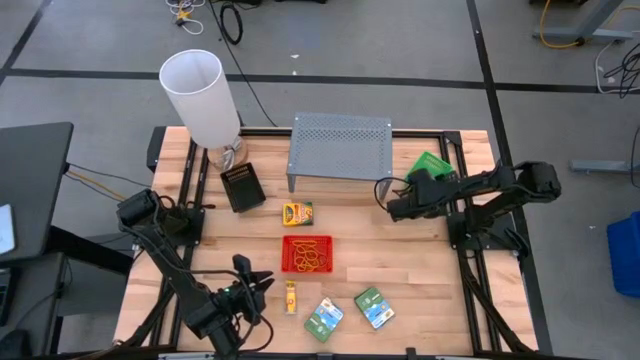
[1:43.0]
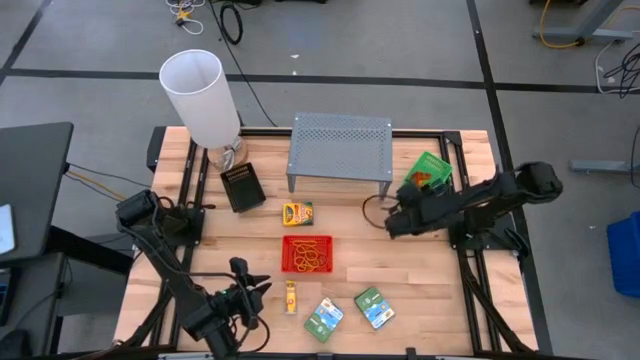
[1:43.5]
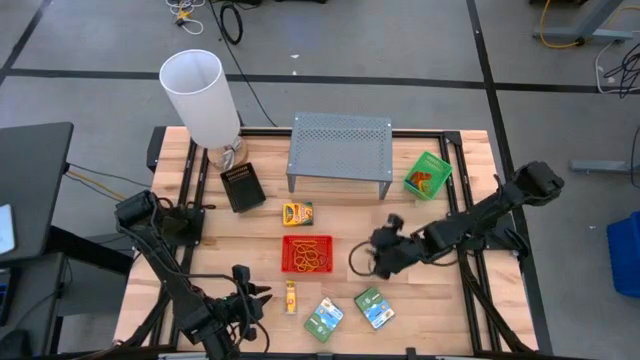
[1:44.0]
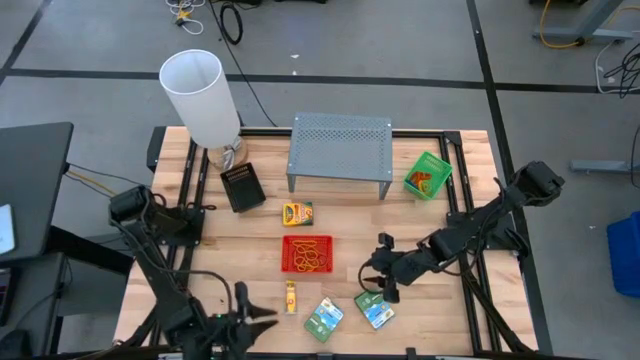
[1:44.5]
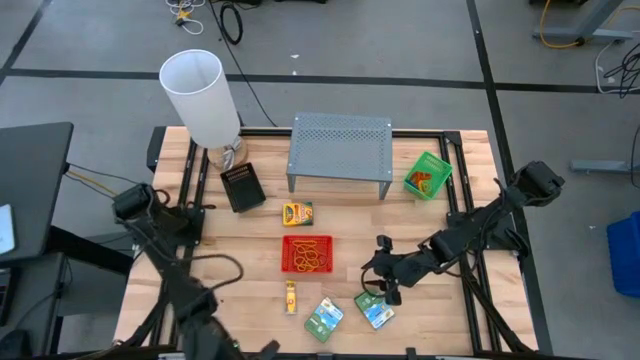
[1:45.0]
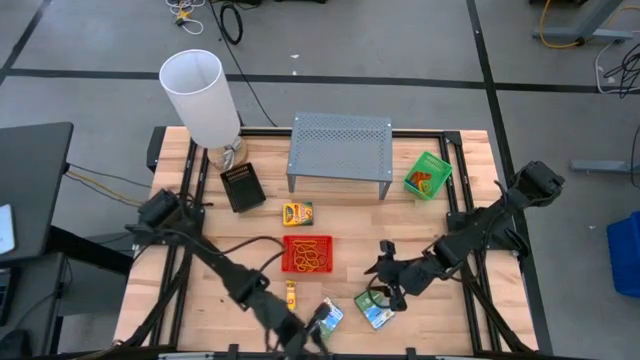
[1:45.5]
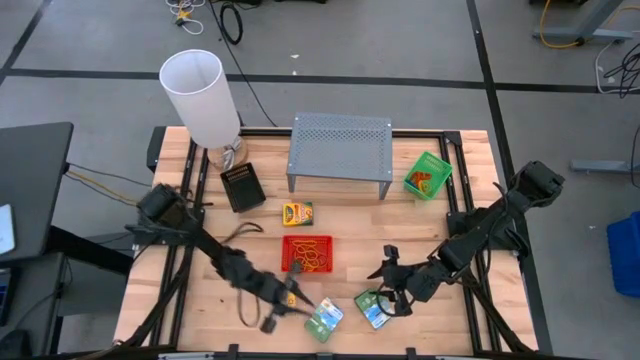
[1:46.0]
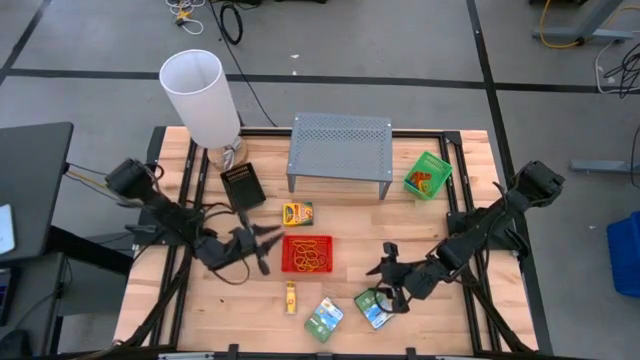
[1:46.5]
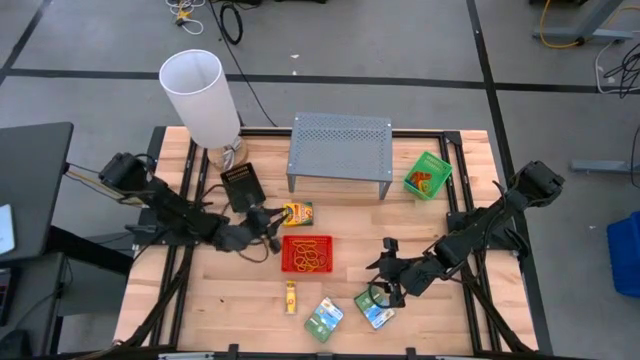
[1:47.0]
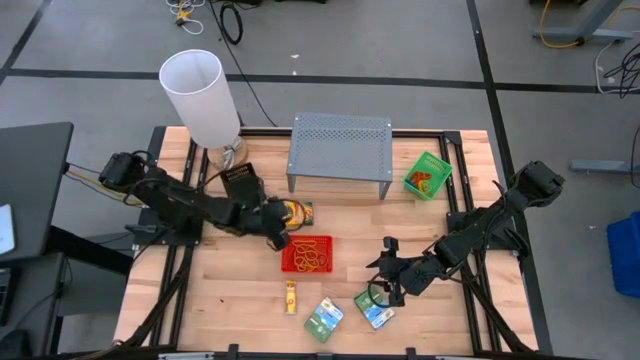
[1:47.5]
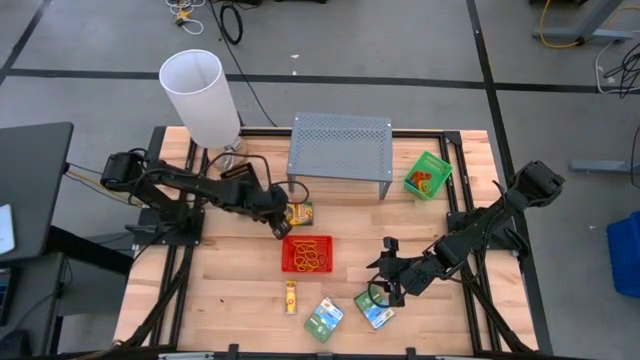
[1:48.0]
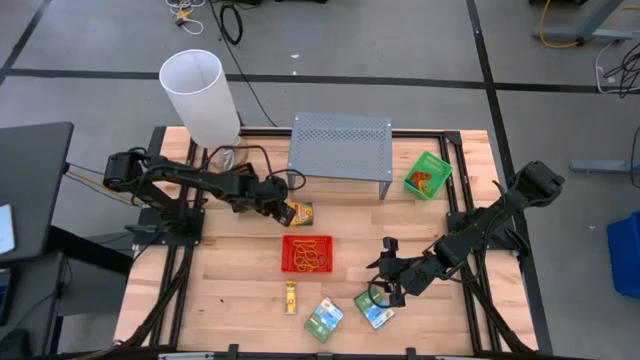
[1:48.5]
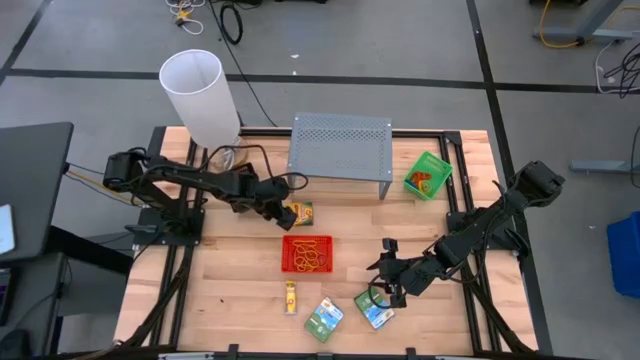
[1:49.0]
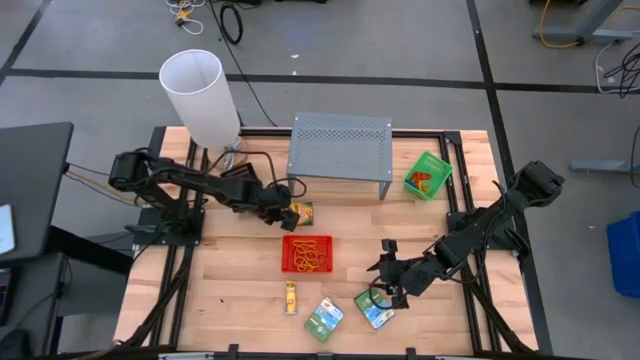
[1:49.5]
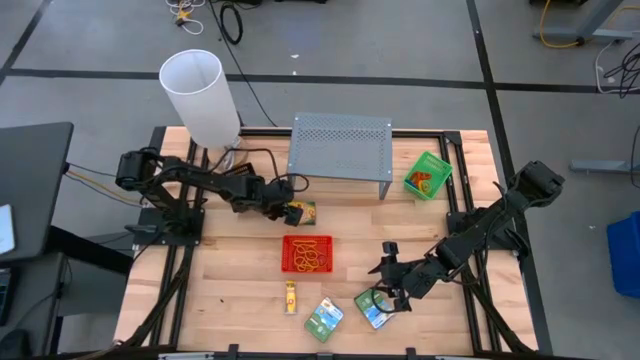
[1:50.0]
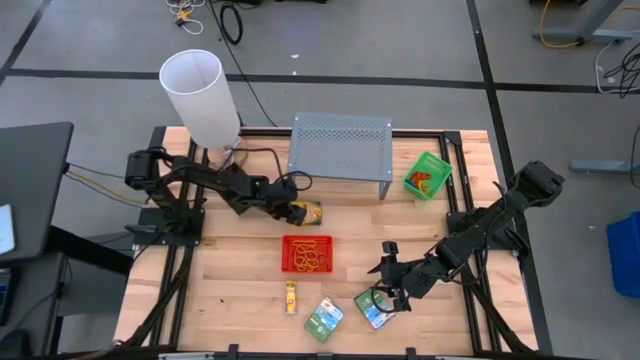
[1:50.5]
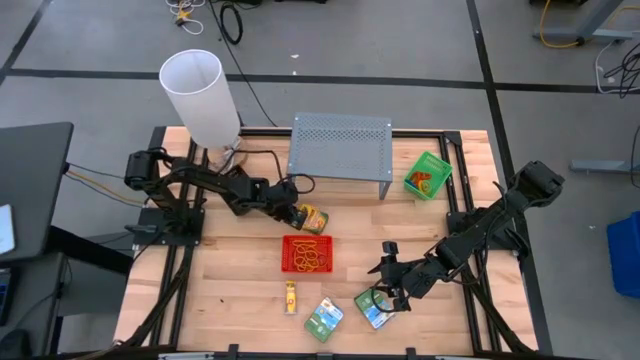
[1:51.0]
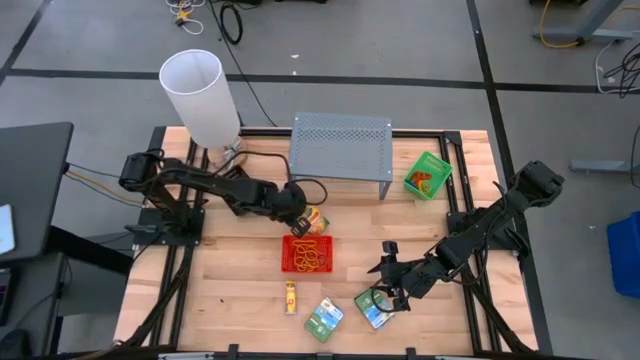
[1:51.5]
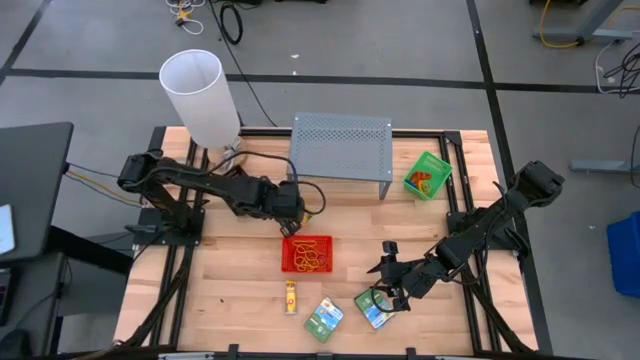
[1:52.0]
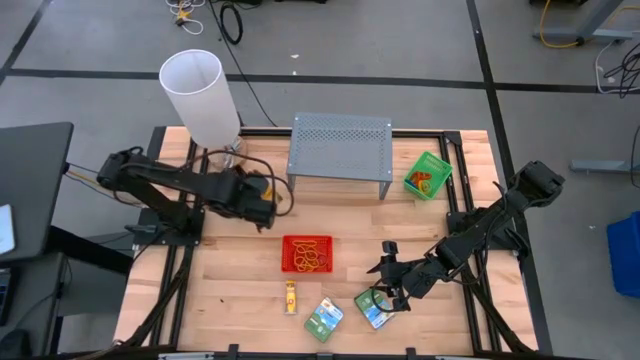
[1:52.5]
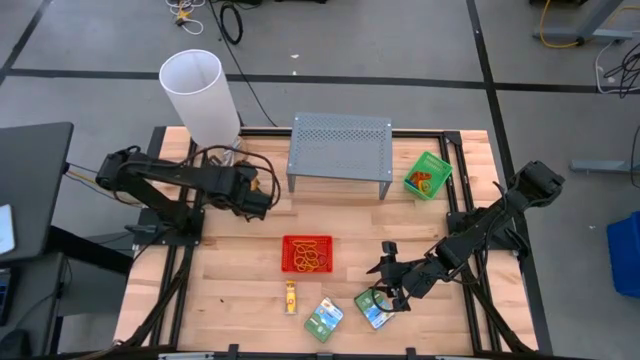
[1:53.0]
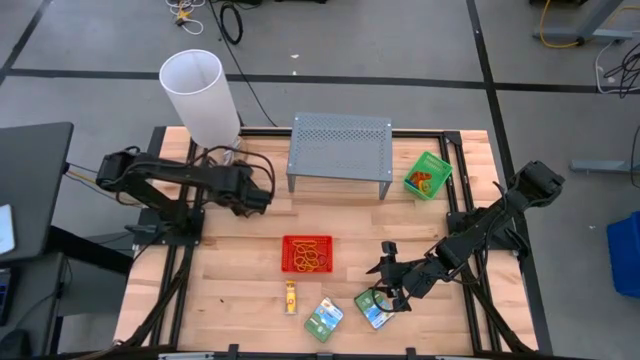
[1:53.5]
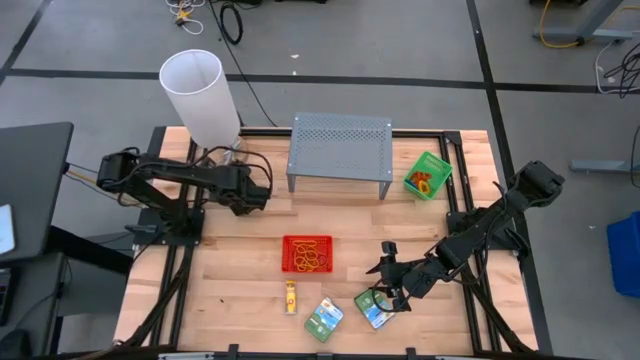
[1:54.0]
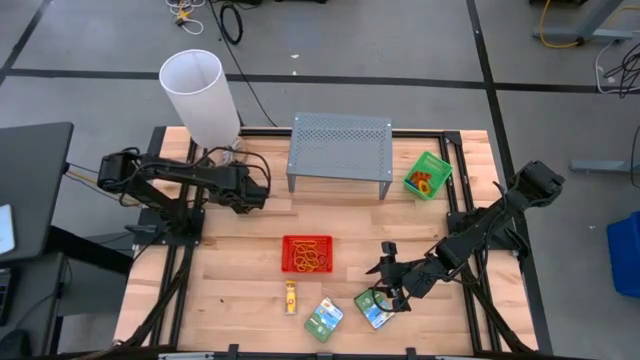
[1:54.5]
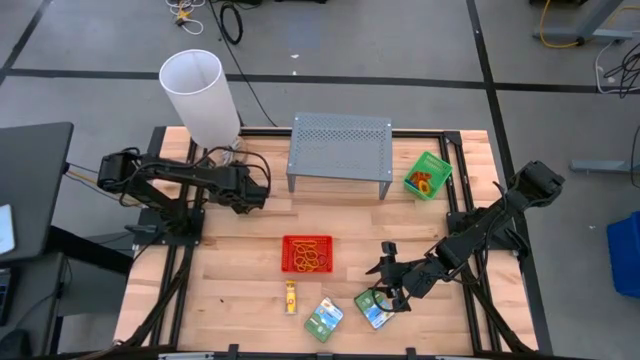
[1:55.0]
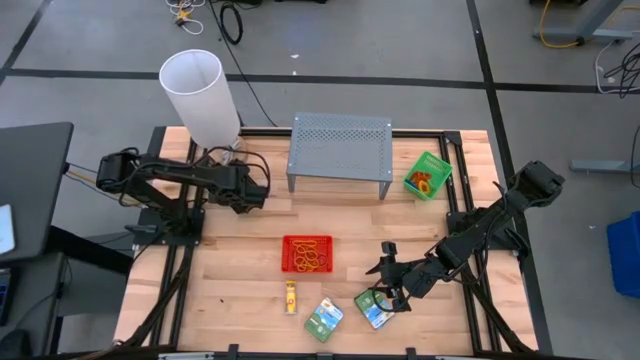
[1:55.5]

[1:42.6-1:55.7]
Task: Pick & Place Office Desk Supplies
Put the crayons box into the black bin

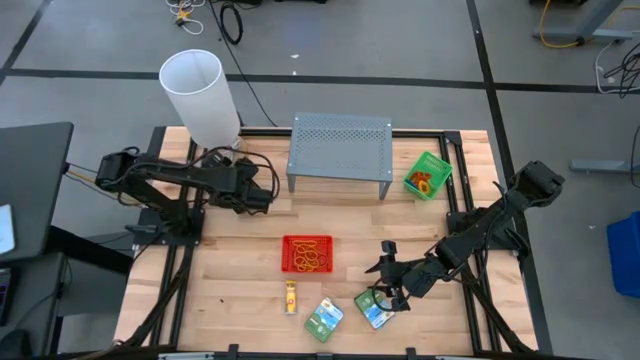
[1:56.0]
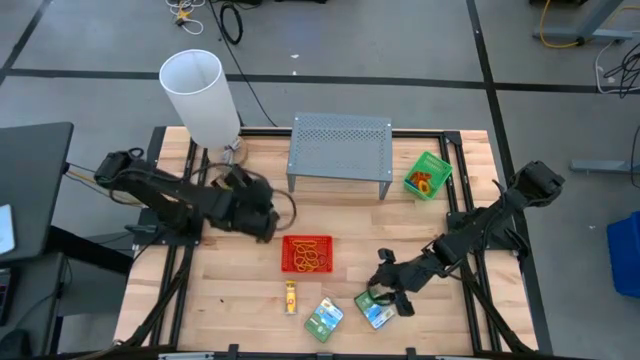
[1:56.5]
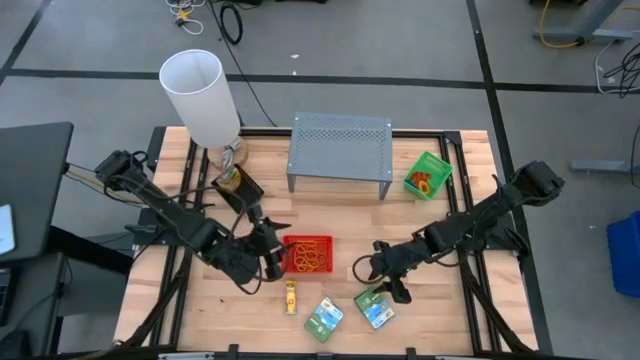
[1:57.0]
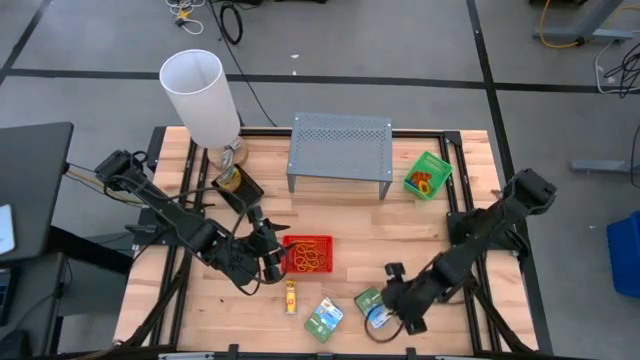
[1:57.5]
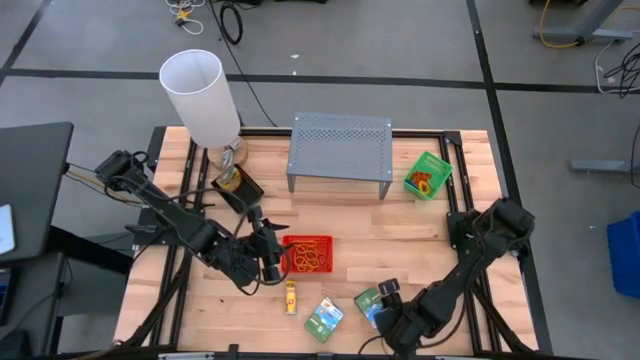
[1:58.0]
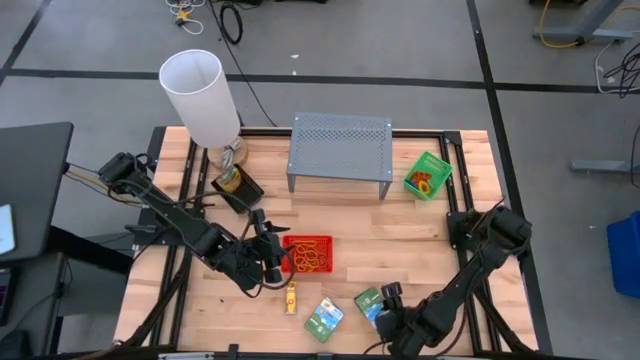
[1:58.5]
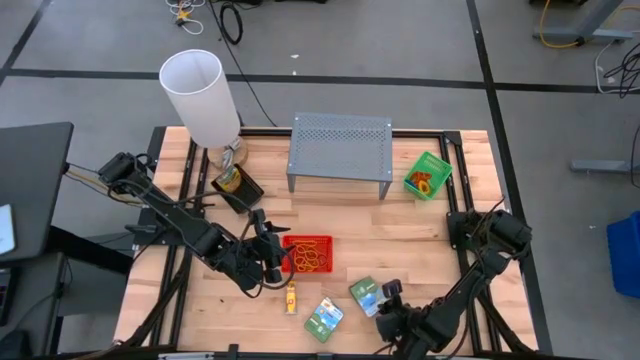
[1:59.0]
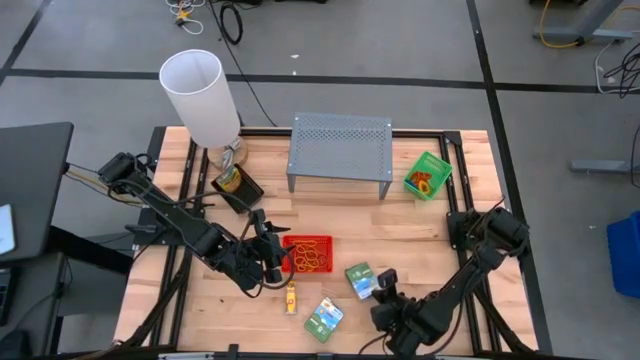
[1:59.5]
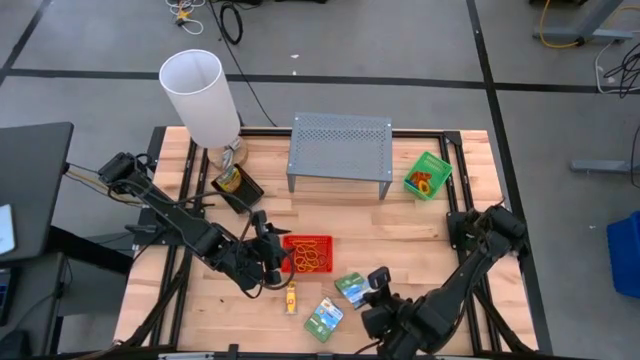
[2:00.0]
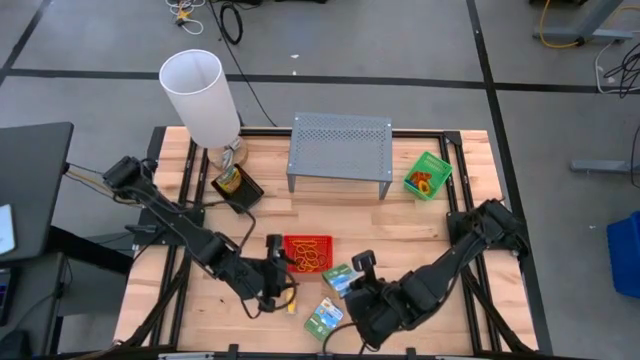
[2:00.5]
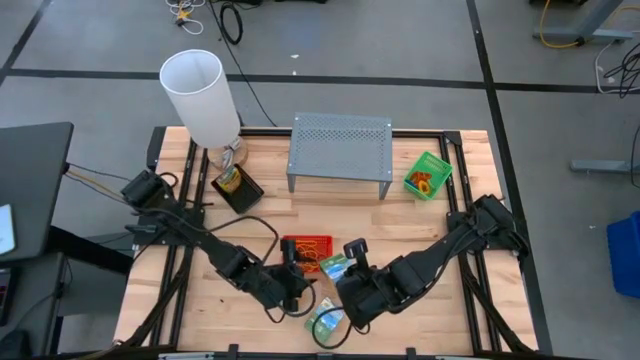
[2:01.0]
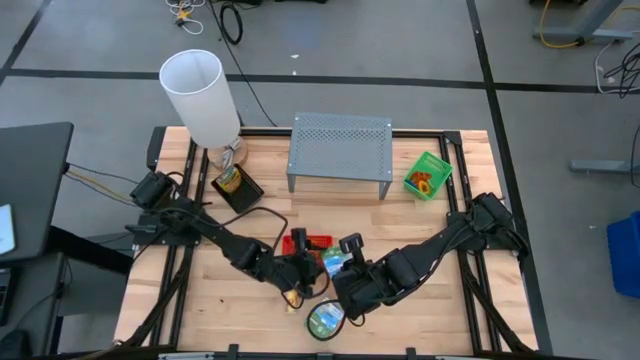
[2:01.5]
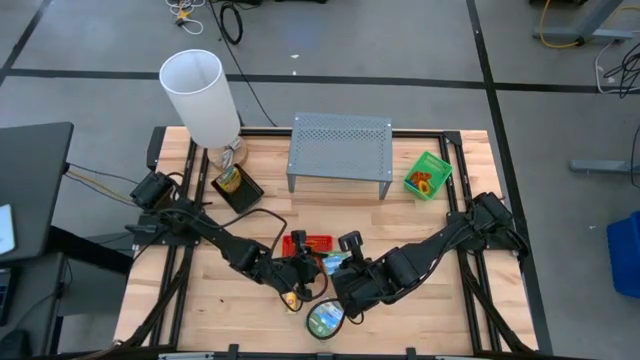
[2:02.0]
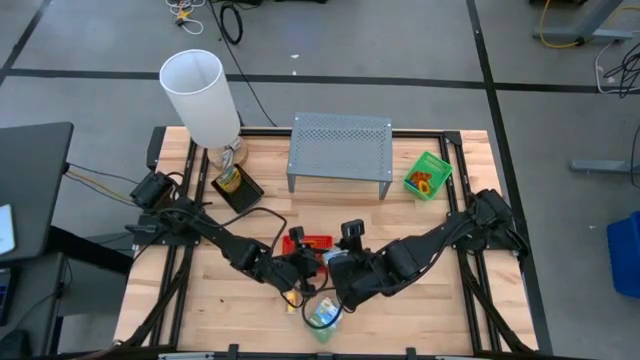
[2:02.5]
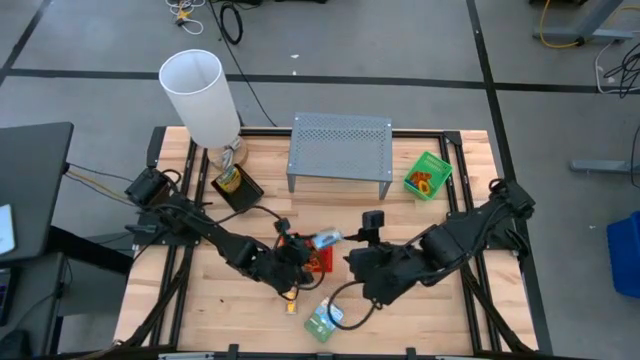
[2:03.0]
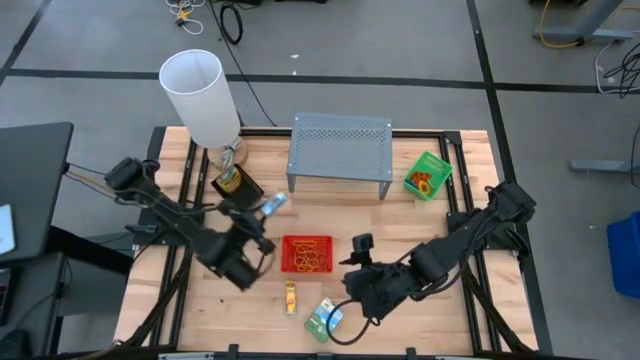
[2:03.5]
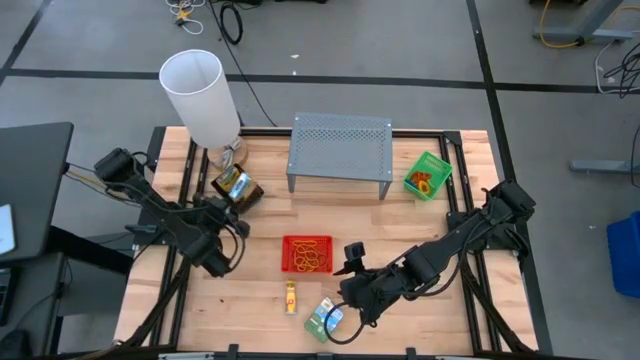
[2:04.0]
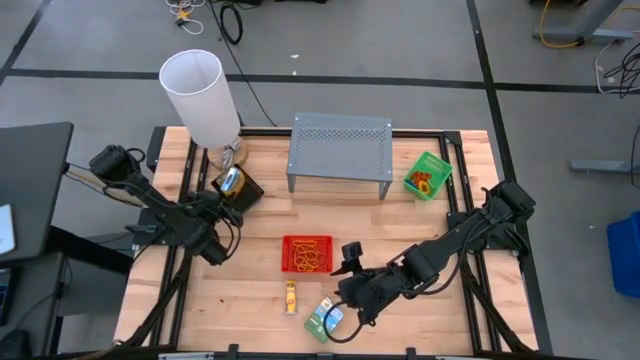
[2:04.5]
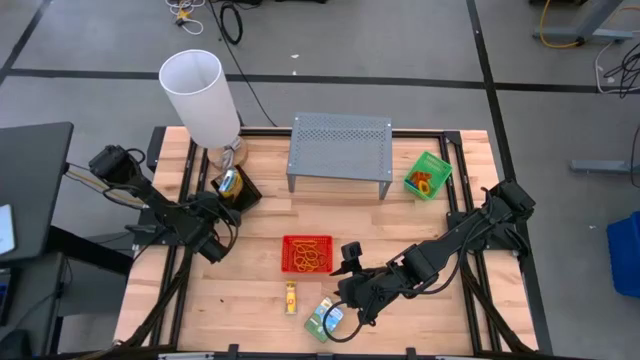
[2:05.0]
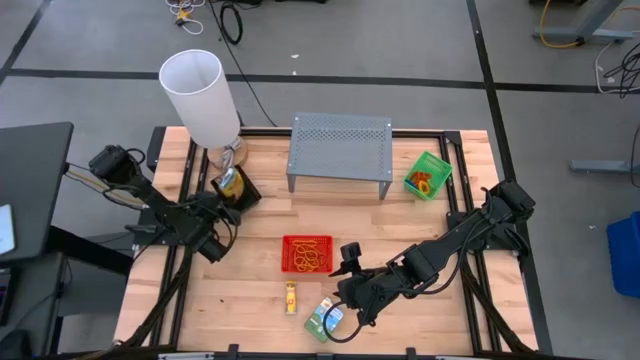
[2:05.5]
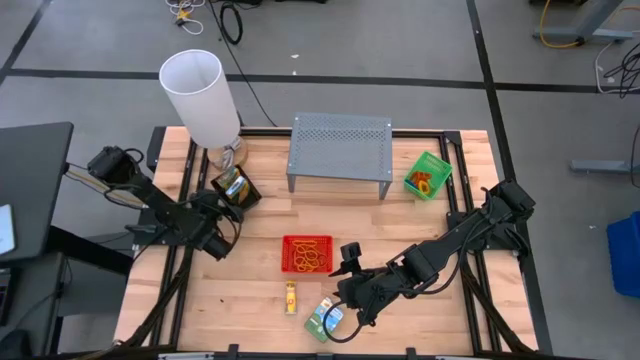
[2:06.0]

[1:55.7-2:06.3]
Put the crayons box into the black bin
